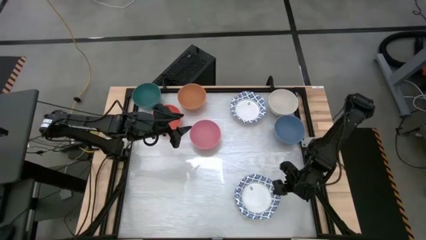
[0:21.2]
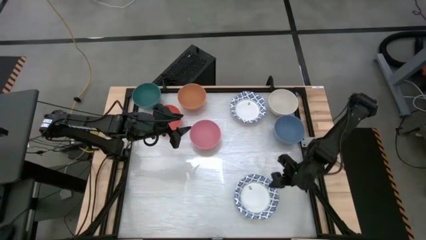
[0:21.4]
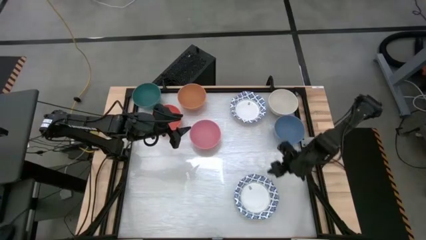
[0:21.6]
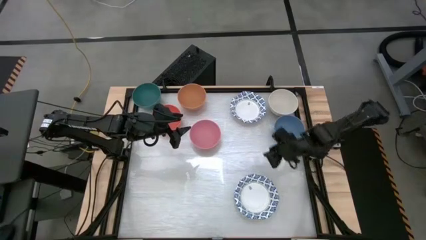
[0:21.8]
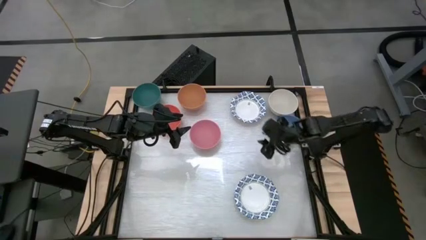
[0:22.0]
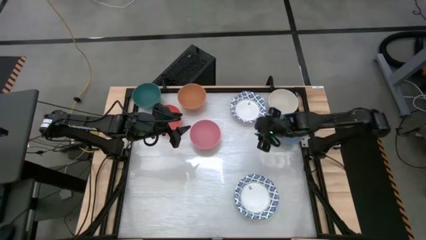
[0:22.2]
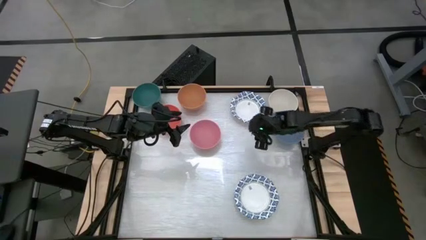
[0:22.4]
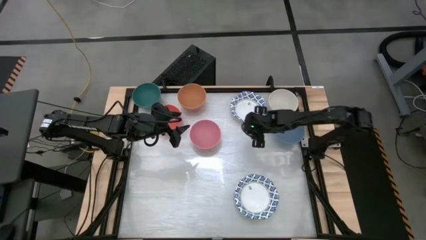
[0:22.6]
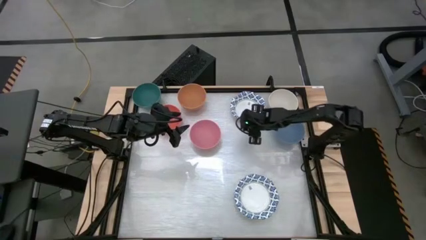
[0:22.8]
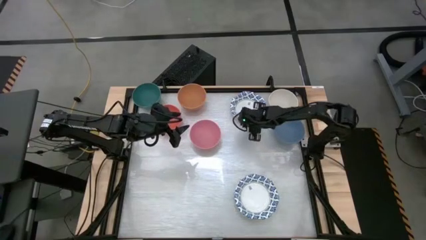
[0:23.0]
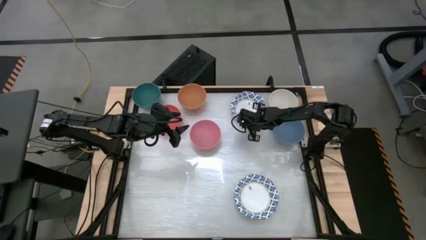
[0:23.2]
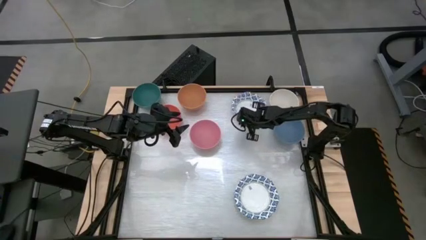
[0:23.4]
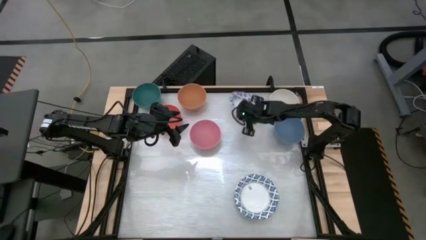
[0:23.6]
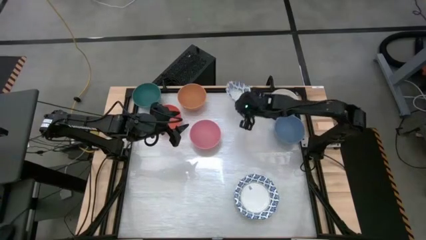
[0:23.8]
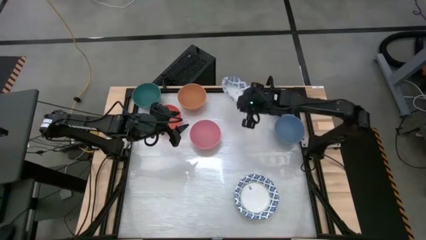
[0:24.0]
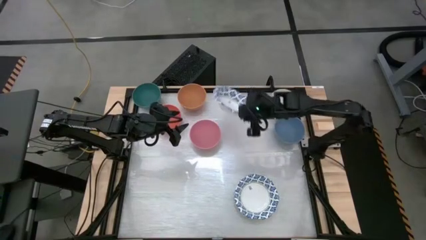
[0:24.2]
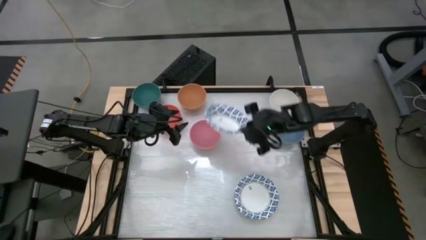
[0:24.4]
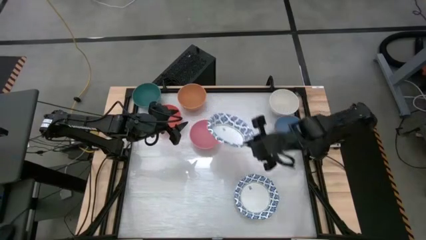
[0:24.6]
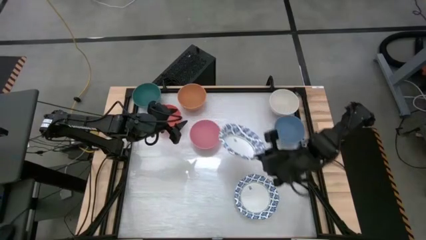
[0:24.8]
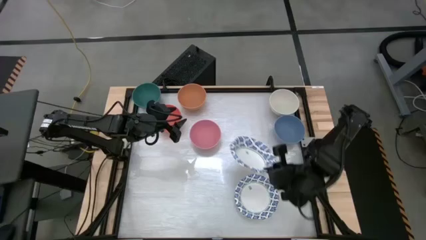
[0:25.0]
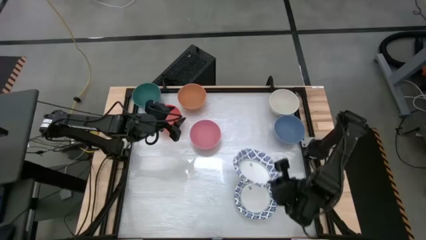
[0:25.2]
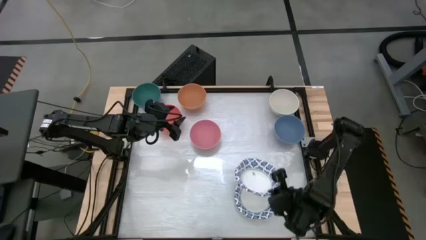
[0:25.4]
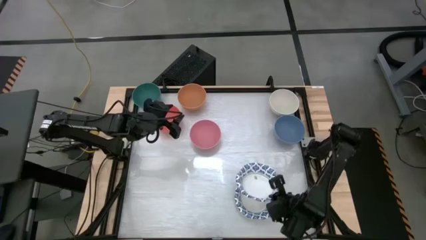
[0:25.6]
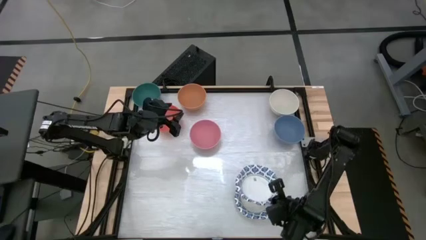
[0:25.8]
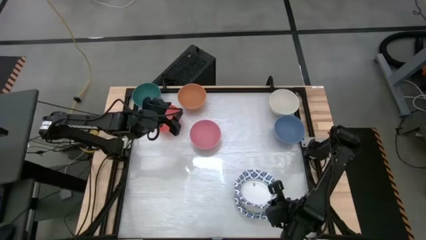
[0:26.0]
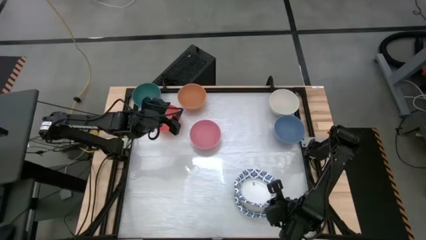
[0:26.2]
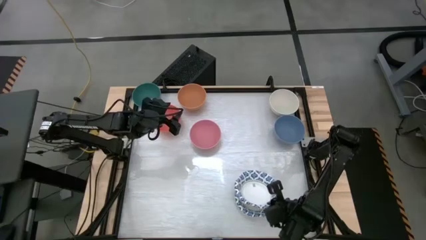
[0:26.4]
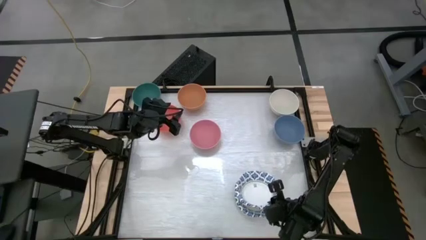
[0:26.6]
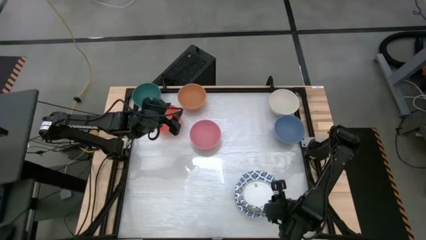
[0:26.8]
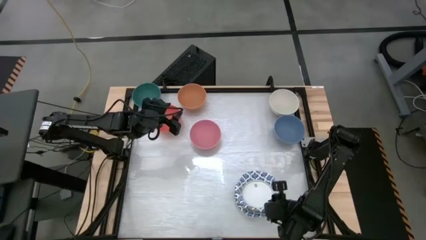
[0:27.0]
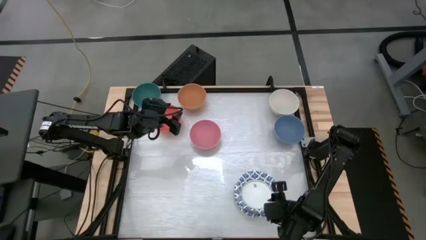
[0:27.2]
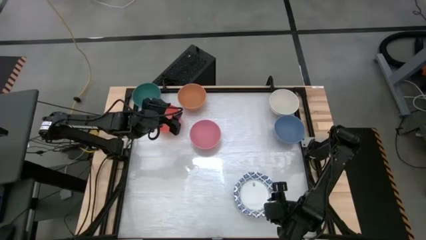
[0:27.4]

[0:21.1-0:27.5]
Stack the top white bowl on top of the bottom white bowl

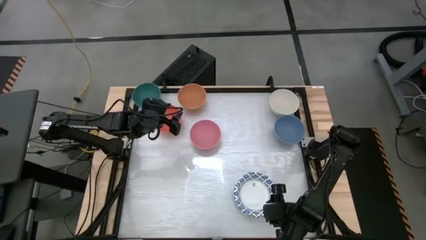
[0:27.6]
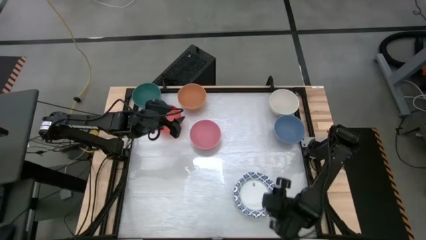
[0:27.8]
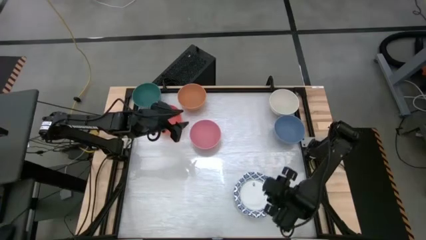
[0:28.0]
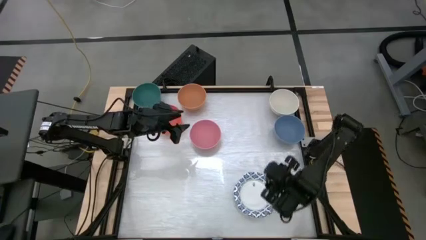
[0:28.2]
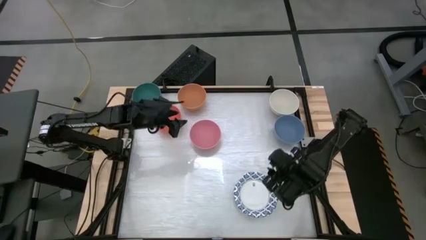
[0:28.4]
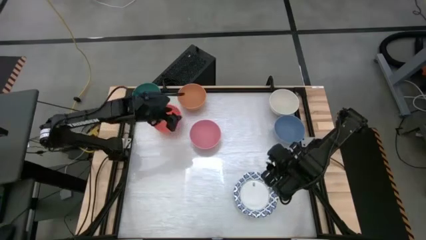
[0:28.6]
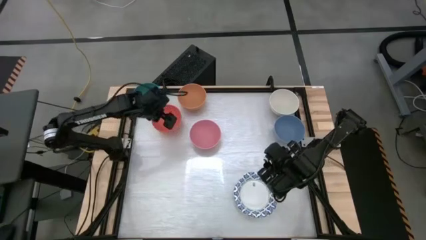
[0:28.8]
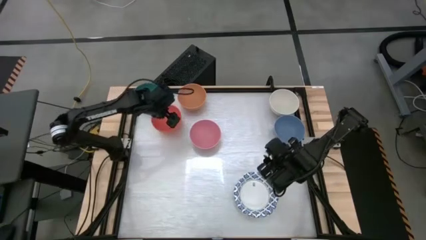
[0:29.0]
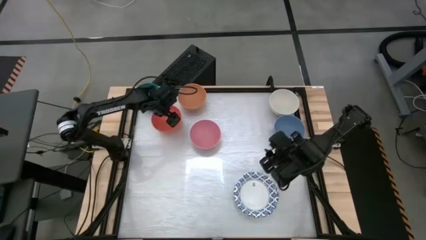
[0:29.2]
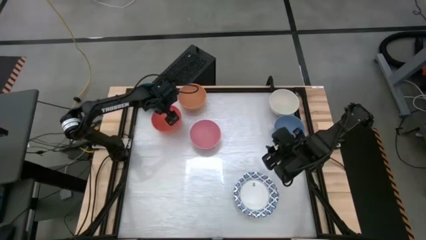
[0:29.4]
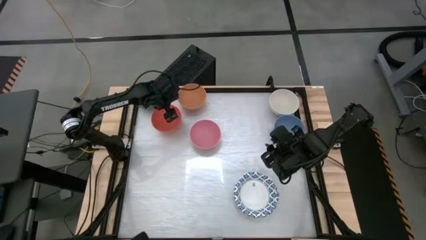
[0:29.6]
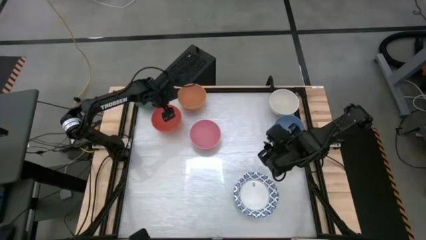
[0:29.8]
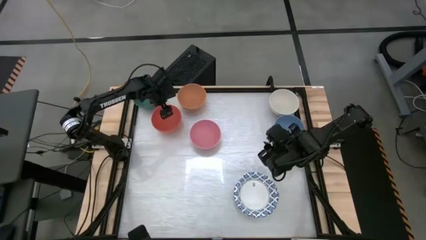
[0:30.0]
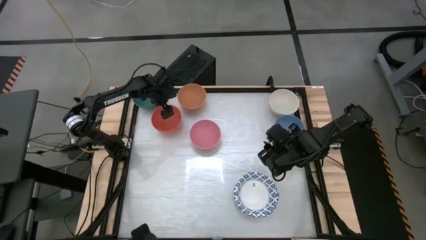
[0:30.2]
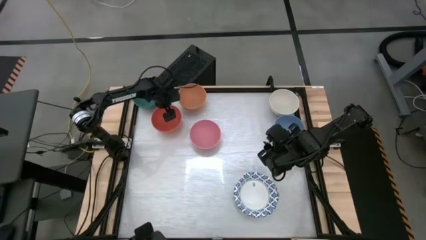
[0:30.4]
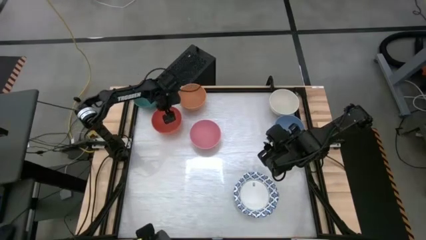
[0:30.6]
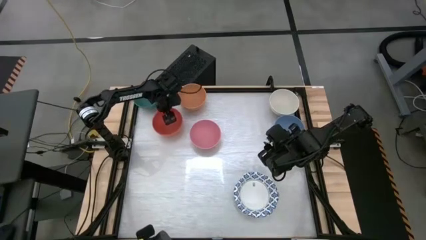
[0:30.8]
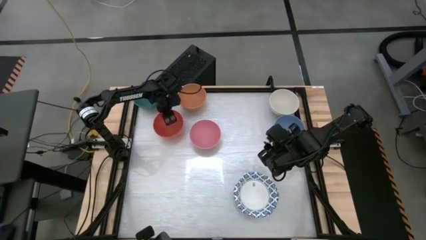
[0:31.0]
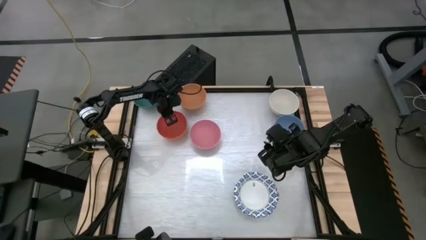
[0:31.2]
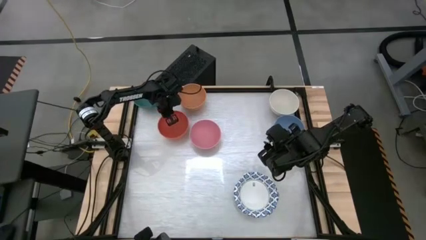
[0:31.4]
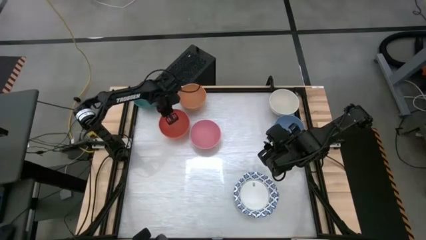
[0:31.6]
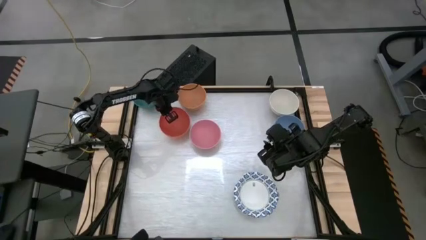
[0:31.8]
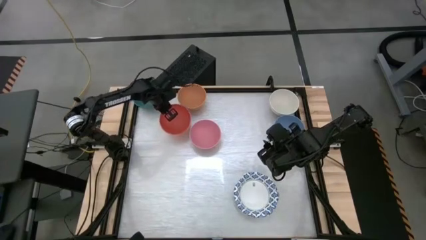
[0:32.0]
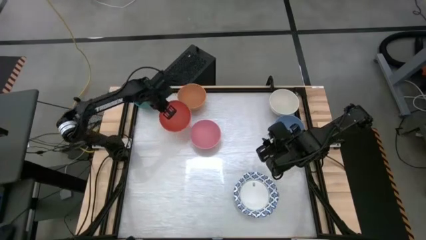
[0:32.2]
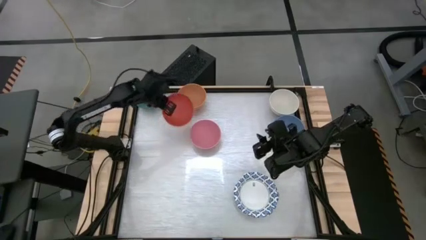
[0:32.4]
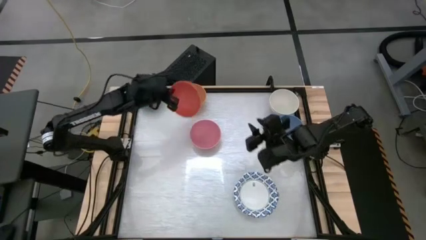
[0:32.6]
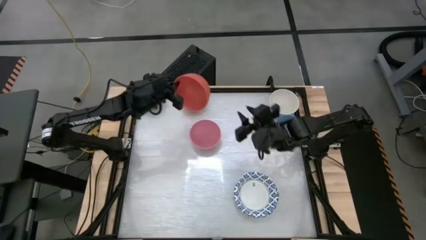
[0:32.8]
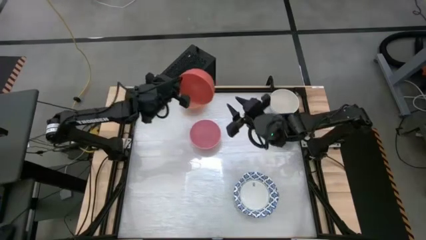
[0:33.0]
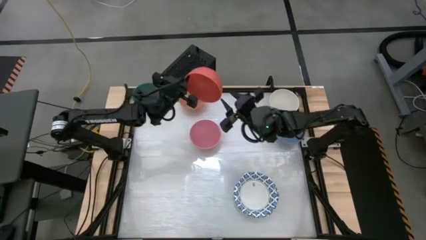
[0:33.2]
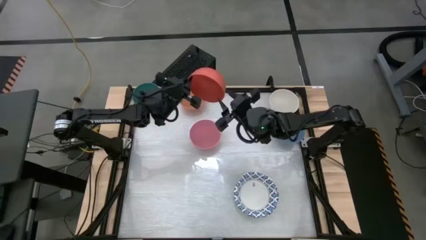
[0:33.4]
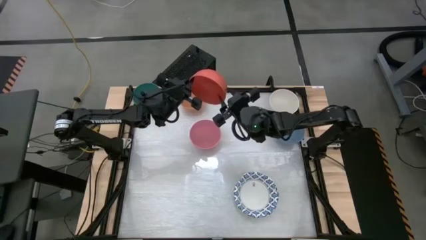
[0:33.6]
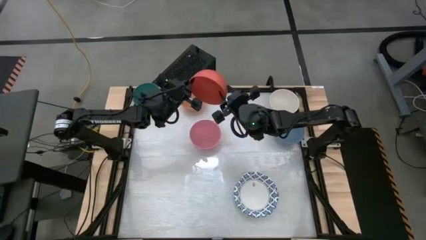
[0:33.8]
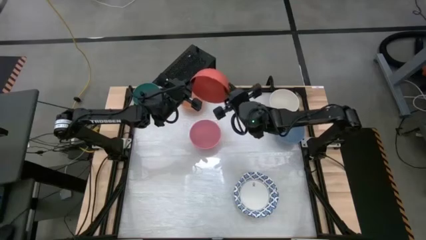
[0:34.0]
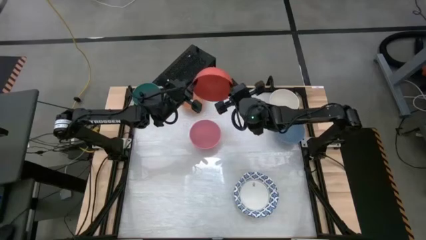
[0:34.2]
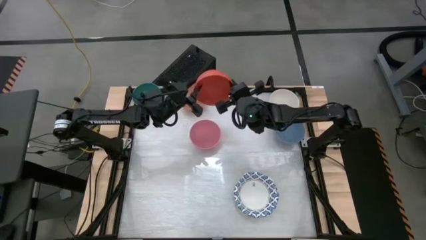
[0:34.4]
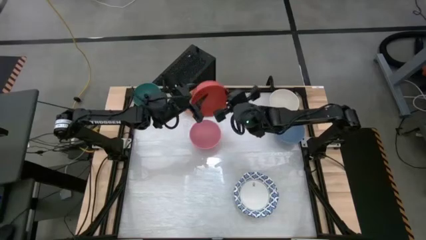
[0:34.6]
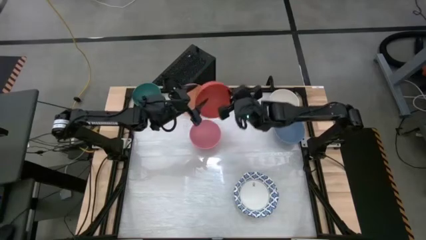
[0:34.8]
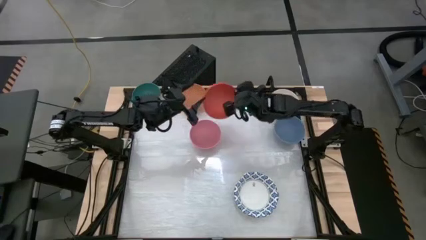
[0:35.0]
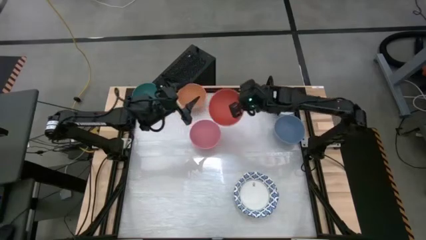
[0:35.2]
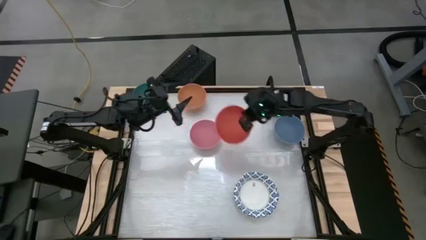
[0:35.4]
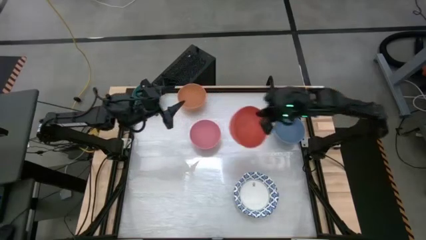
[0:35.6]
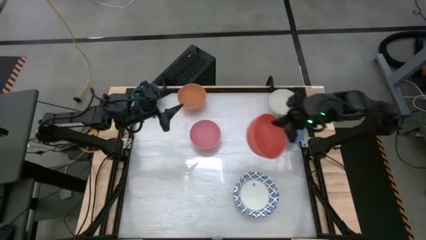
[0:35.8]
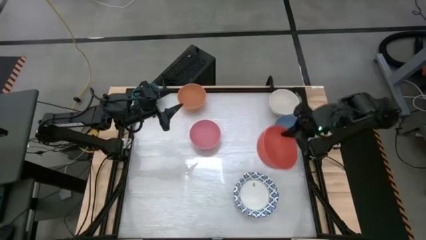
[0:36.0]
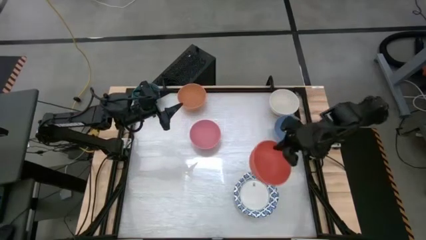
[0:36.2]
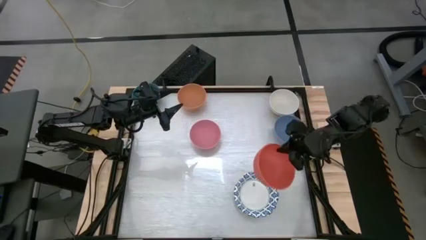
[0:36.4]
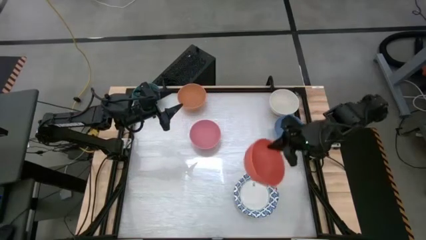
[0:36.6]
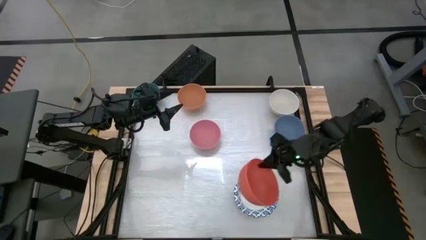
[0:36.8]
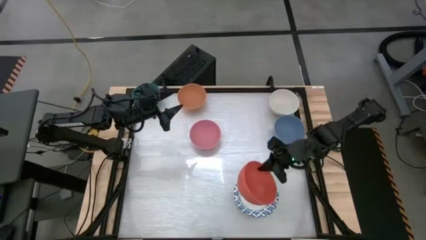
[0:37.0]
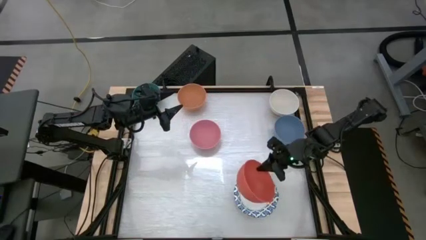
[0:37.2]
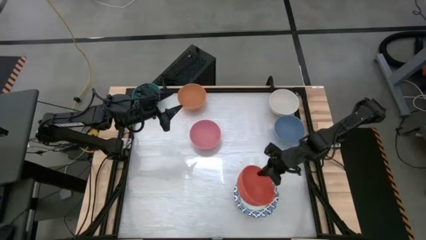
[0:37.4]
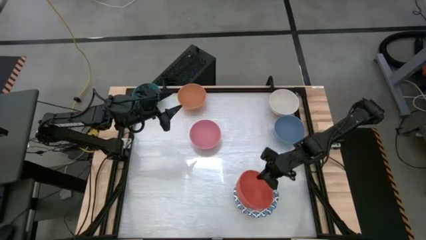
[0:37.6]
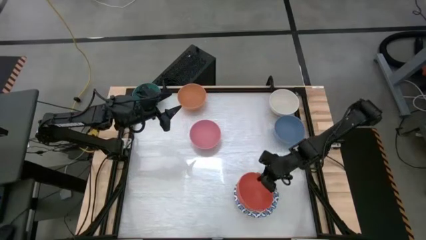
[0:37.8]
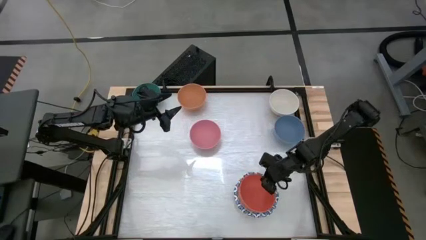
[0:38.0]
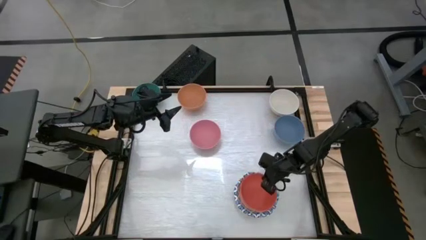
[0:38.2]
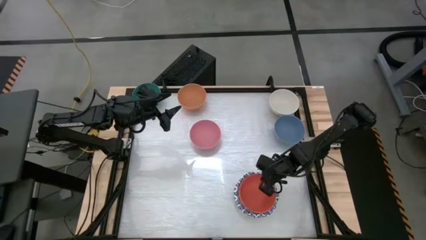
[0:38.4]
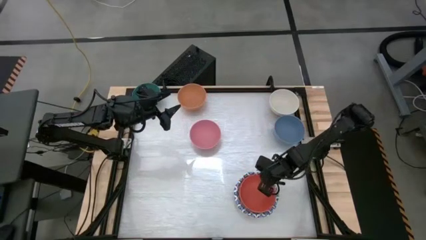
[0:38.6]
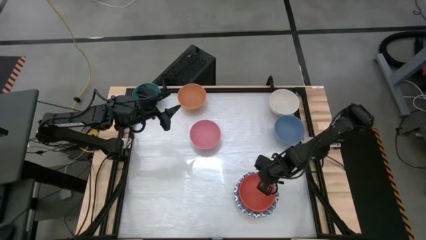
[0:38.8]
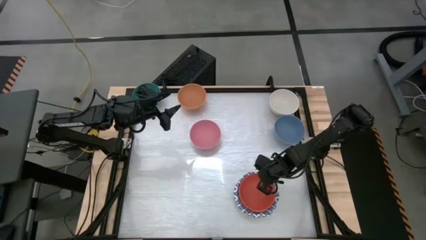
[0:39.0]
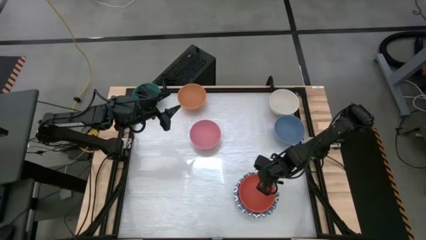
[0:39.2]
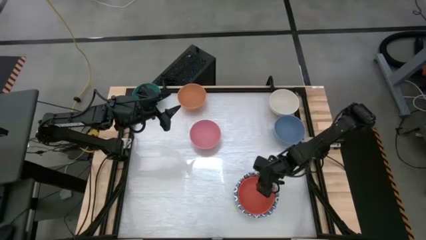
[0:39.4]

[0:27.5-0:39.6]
Stack the red bowl on top of the white bowl
